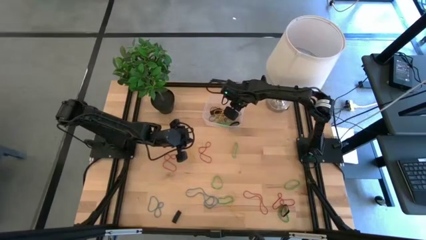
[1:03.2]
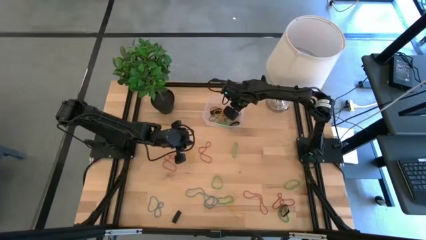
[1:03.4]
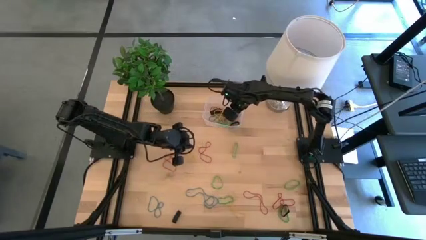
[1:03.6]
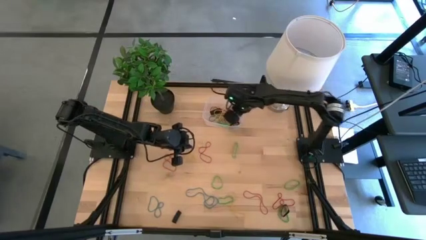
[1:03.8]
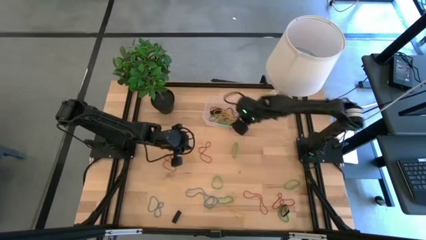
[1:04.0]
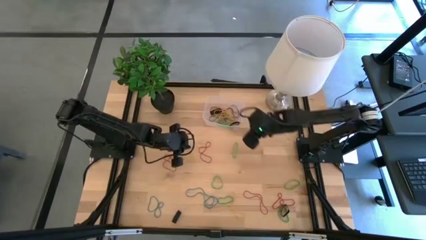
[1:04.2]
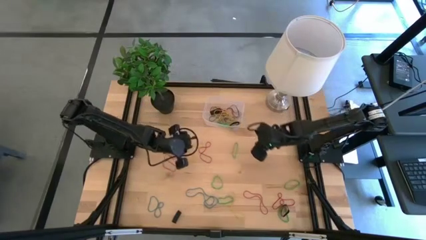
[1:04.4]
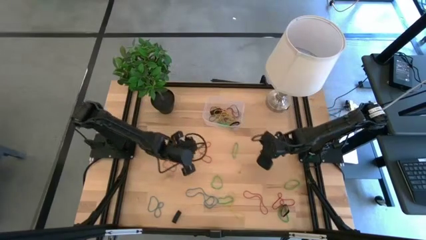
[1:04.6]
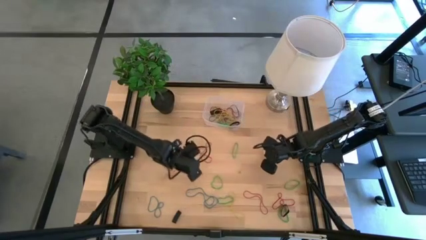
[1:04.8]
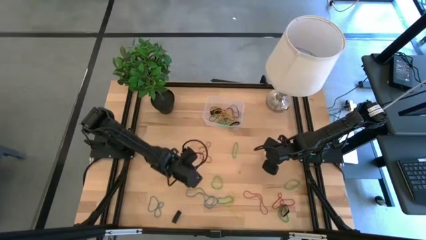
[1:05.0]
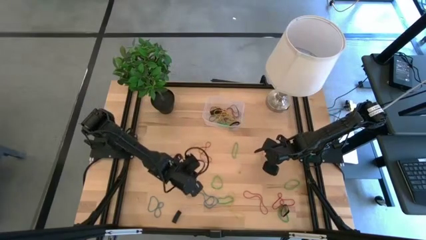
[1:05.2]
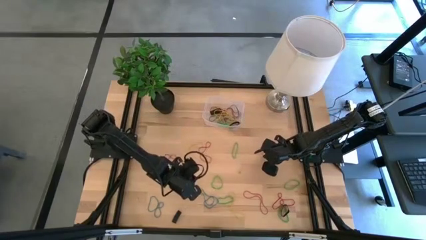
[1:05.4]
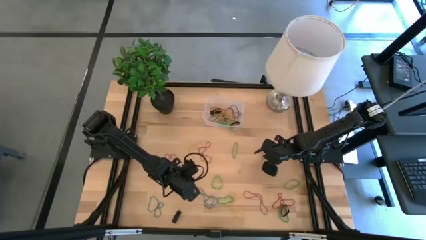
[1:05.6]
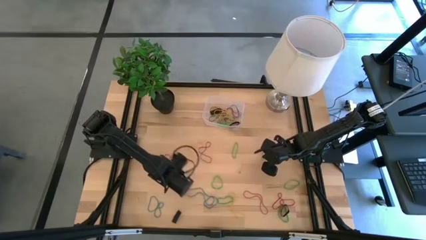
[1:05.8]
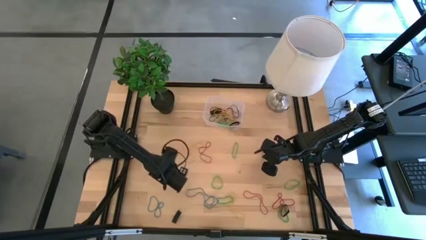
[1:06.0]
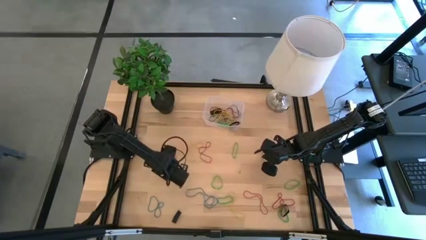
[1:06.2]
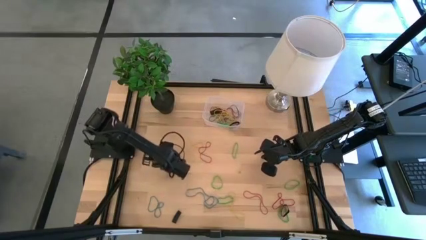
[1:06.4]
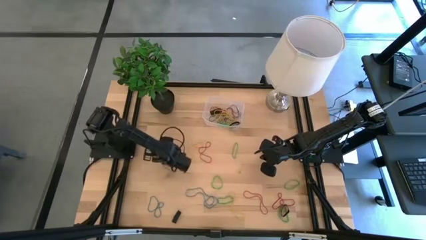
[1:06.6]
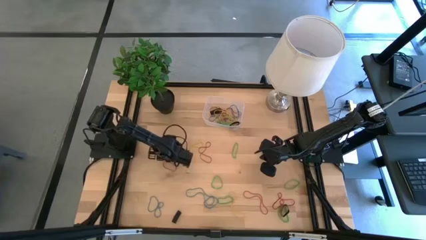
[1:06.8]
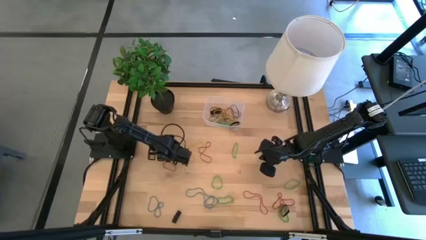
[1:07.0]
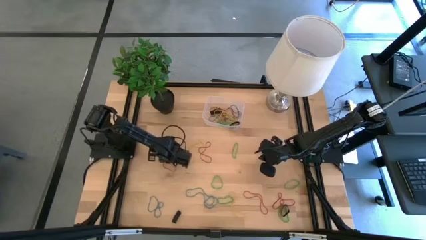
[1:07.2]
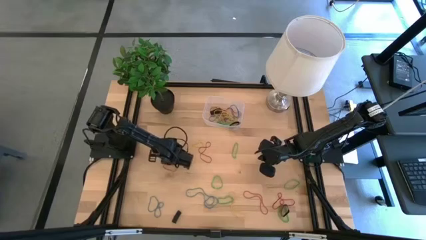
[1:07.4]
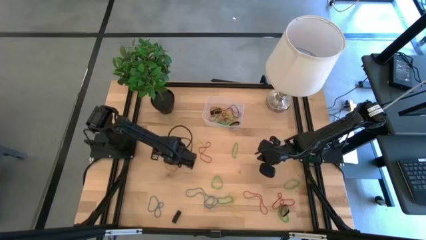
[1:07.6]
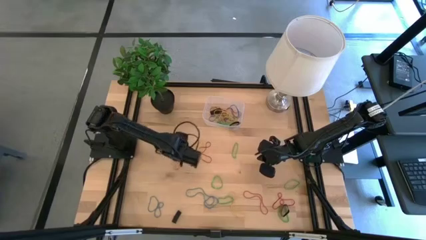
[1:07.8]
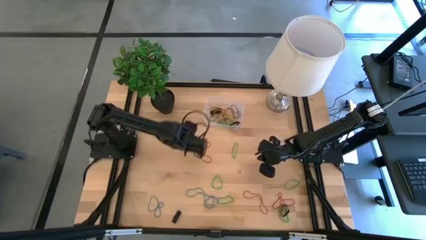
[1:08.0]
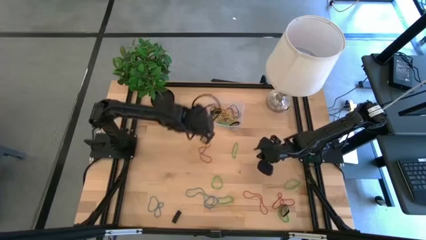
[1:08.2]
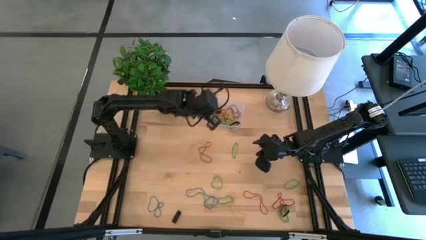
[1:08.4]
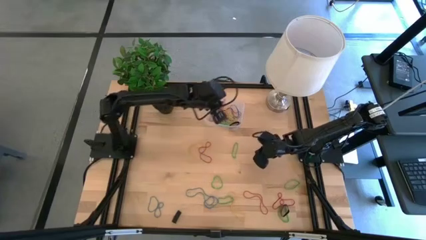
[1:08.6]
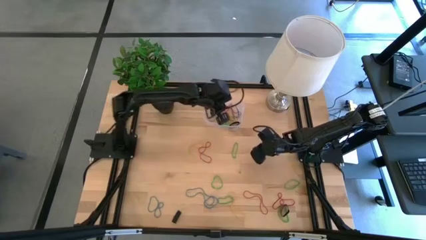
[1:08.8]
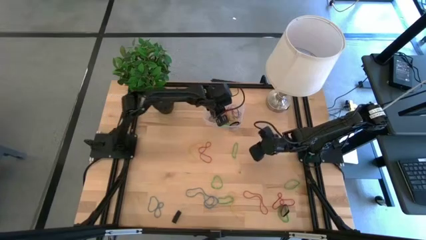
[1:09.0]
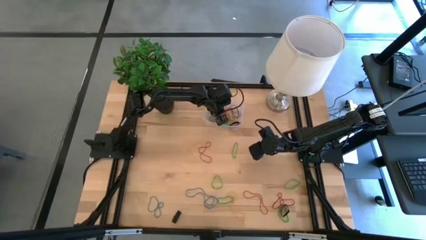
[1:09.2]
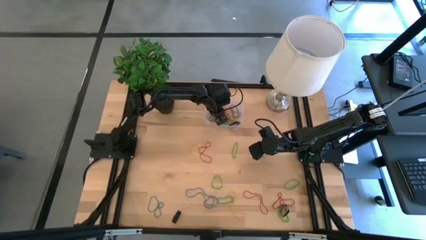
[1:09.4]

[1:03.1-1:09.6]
Task: Pick and place rubber bands into bin
Put the red rubber band into the transparent bin

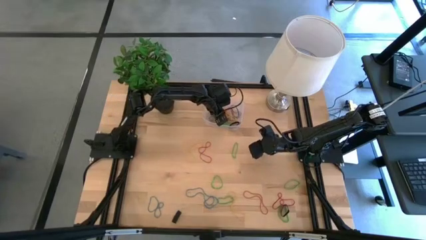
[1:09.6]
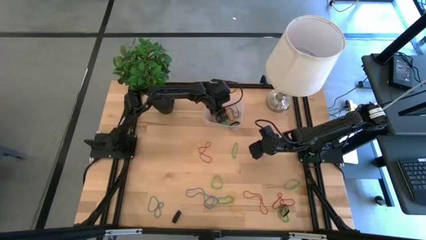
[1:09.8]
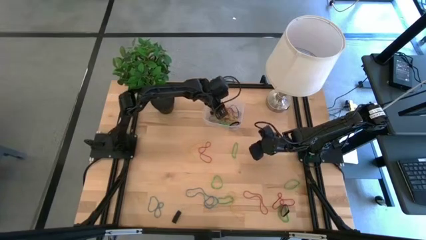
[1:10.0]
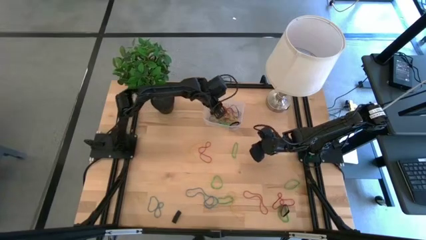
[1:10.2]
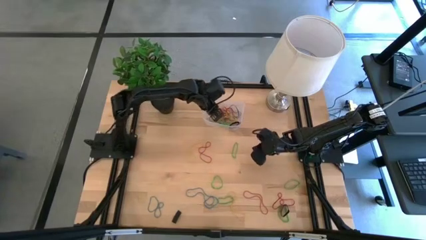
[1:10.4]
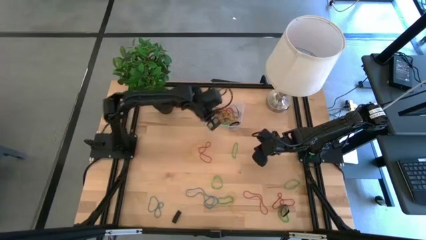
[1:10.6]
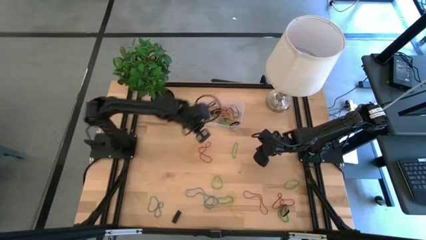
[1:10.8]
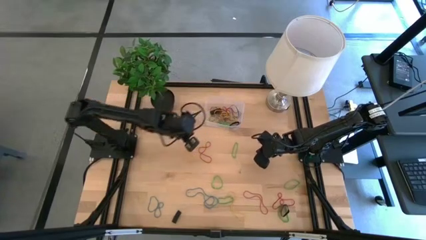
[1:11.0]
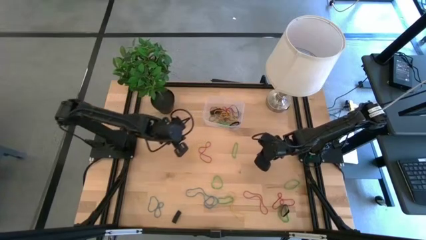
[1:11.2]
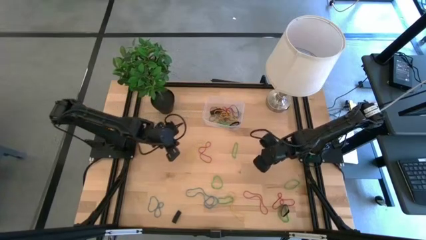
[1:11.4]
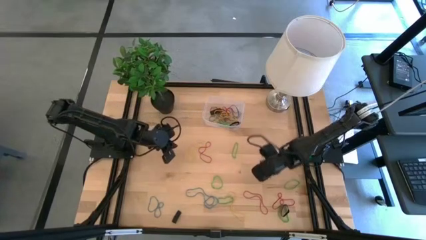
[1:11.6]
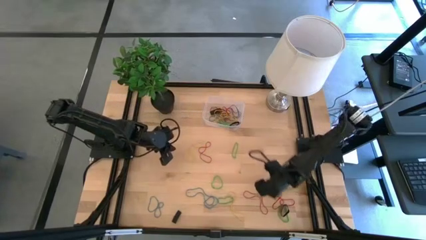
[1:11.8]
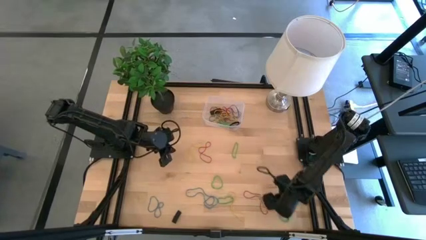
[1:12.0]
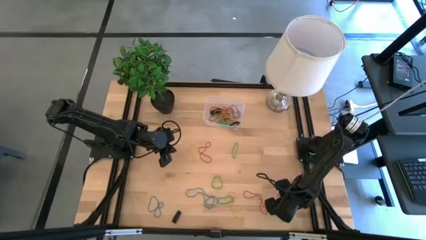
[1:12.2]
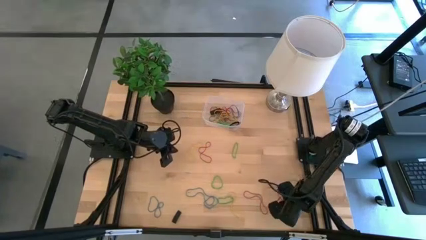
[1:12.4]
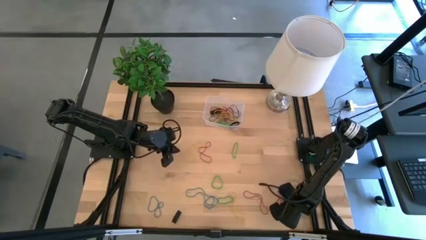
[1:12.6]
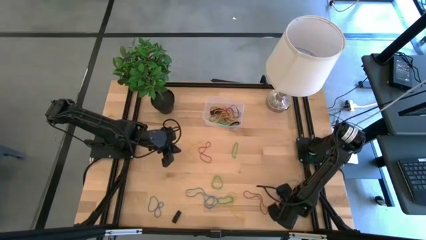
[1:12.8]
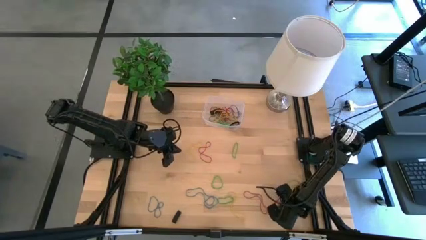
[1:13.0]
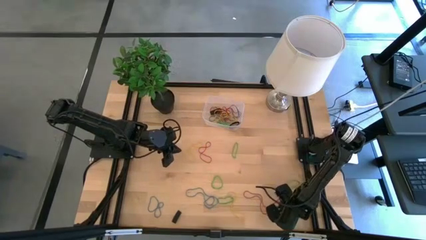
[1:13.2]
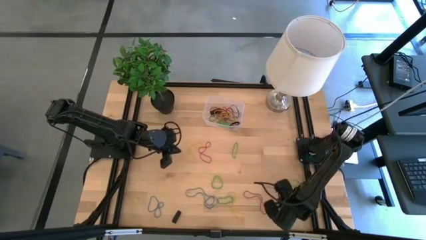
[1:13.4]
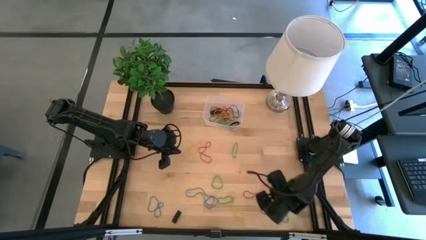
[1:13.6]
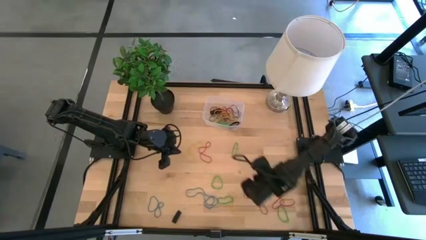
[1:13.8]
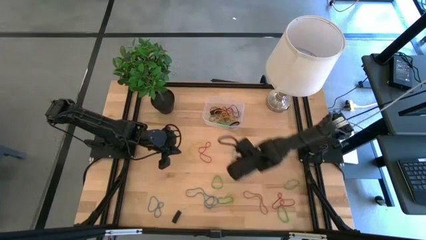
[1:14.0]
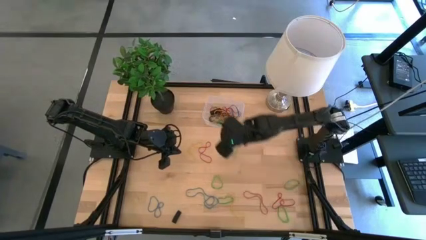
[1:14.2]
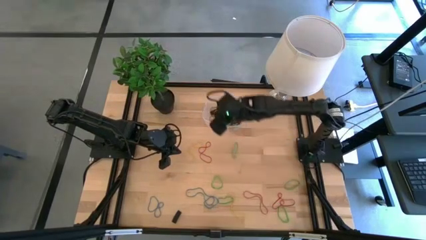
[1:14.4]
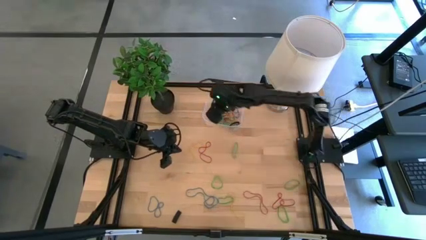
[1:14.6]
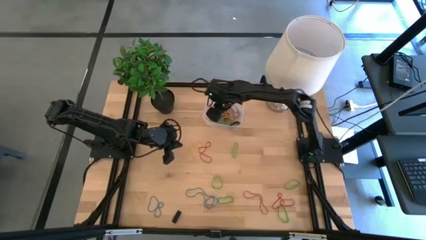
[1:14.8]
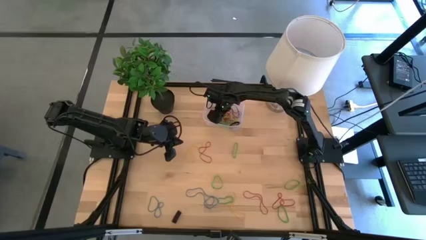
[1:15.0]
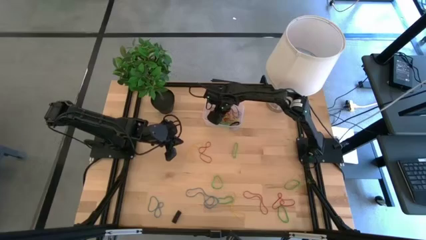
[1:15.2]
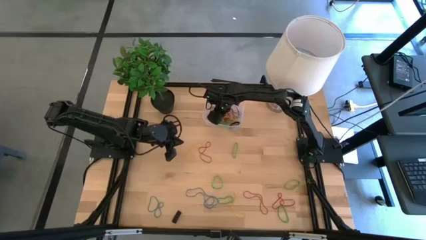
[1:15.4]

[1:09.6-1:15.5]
Put the black rubber band into the transparent bin

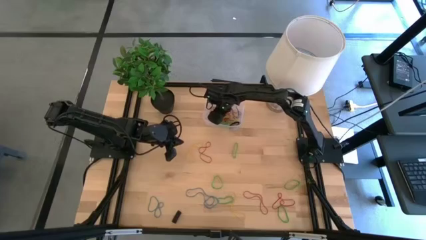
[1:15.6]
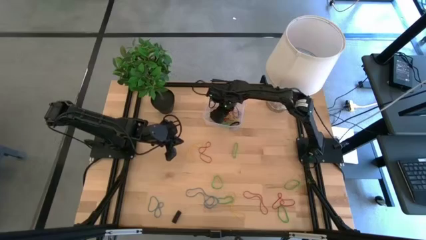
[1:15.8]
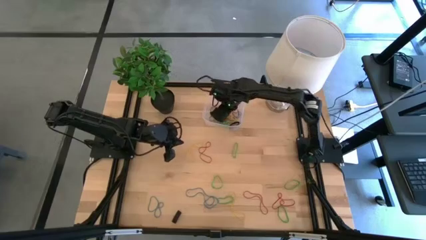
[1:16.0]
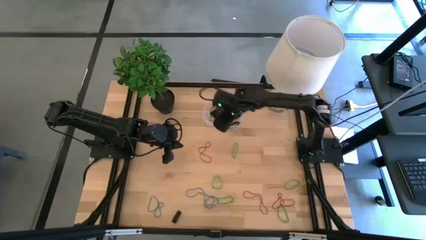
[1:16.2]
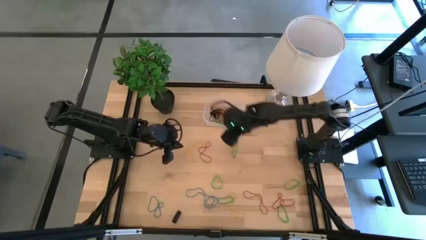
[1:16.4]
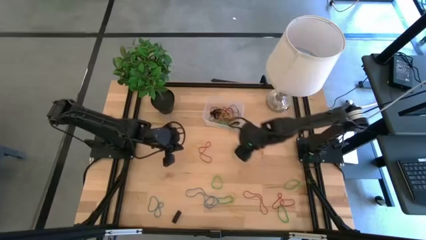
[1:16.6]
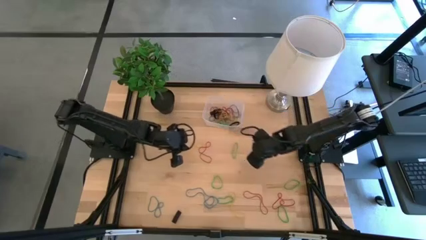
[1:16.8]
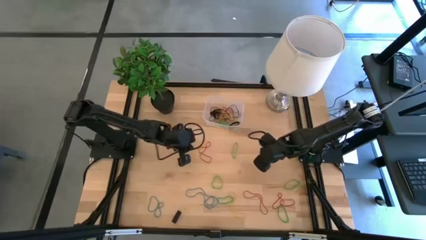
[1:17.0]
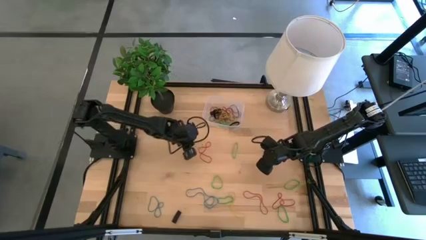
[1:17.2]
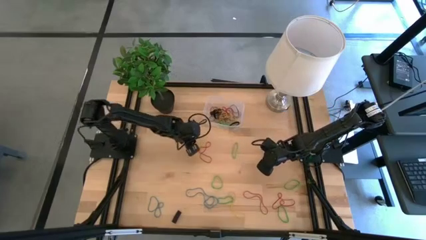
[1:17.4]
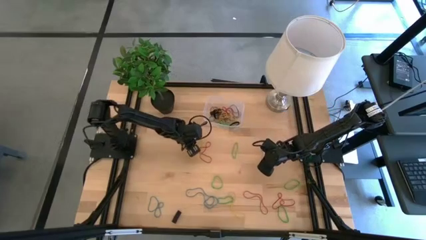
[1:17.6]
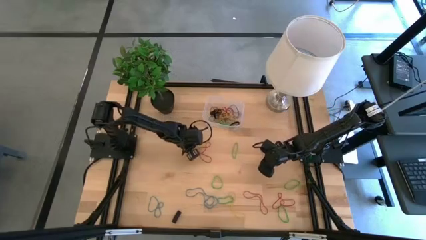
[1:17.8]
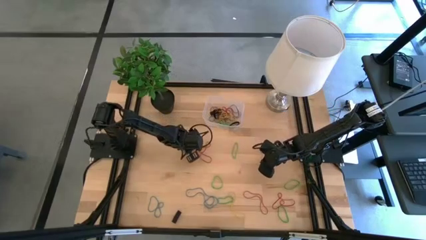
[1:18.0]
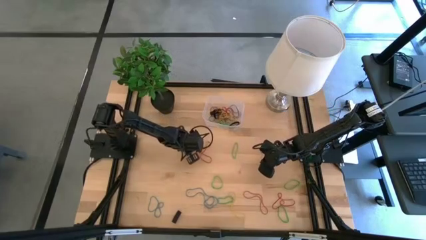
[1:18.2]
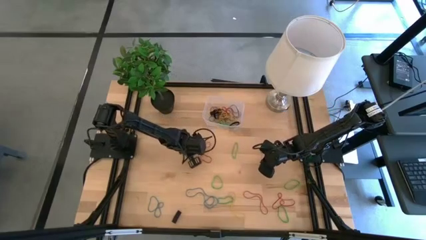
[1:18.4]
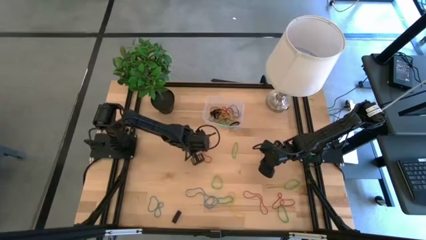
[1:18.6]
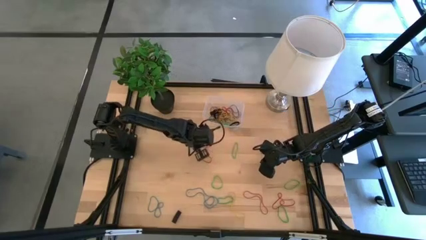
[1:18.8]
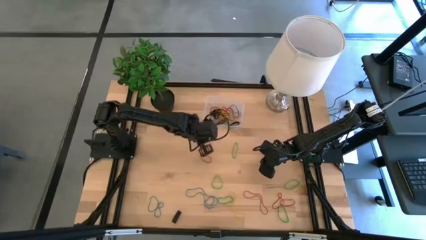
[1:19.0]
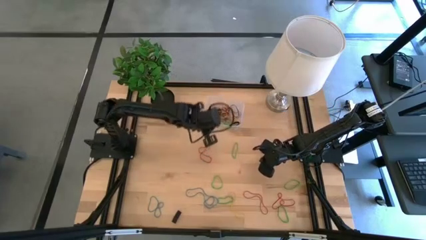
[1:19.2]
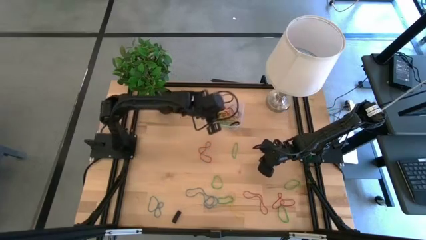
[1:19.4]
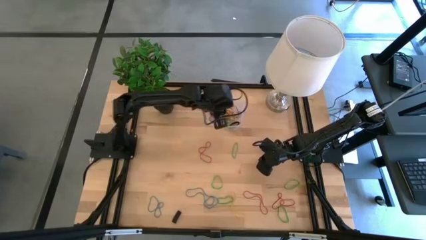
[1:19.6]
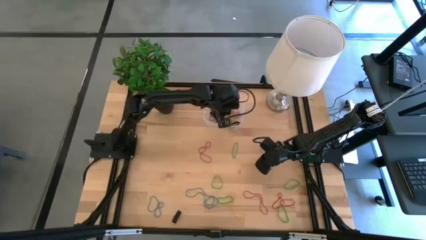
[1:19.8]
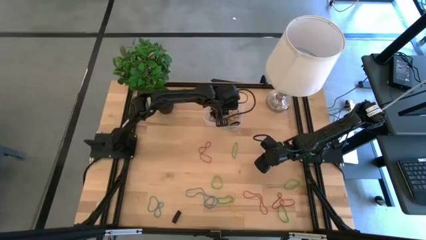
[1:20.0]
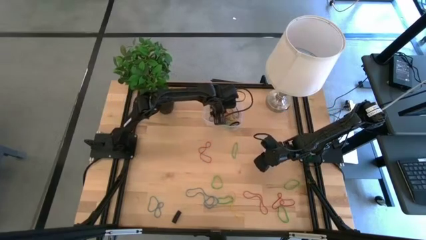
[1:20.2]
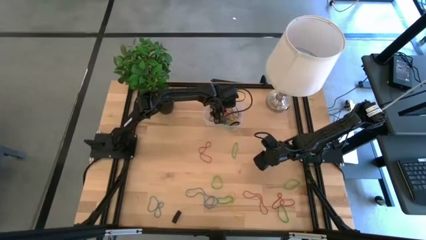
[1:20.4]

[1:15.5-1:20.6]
Put the yellow rubber band into the transparent bin
